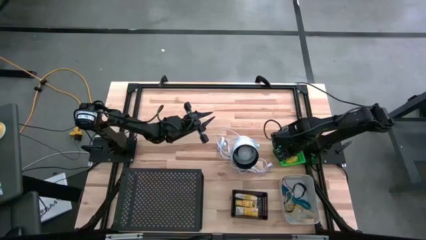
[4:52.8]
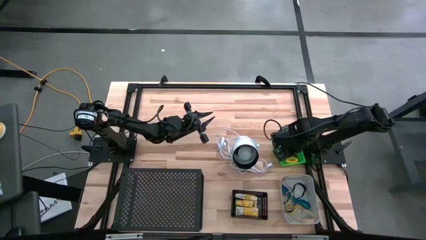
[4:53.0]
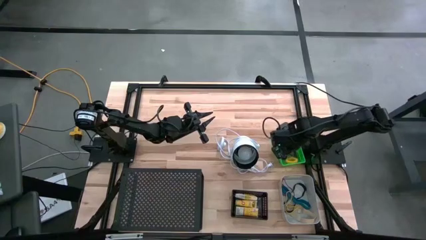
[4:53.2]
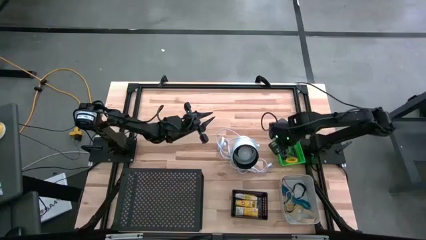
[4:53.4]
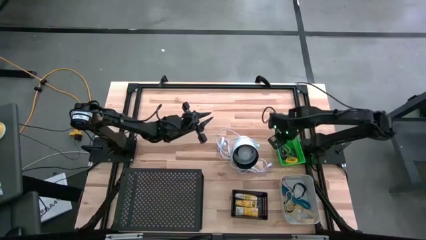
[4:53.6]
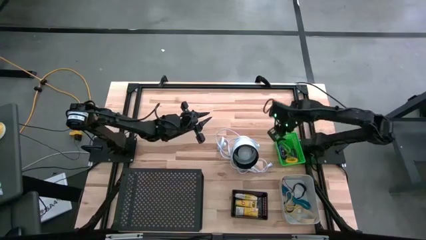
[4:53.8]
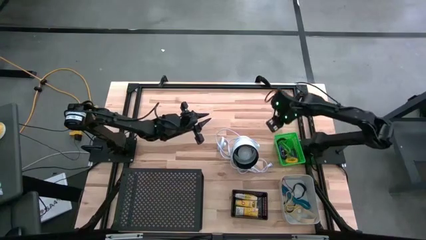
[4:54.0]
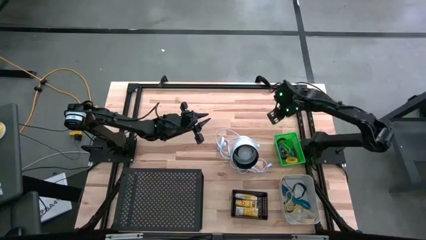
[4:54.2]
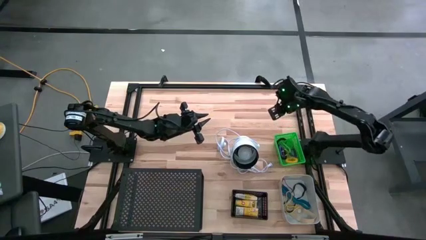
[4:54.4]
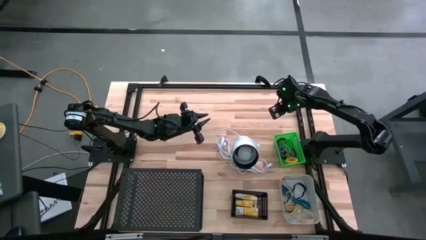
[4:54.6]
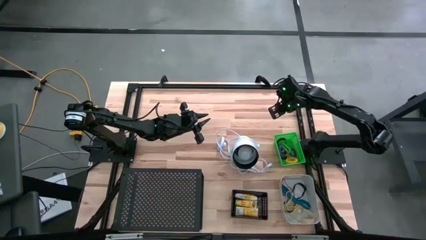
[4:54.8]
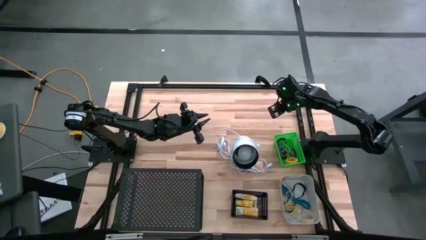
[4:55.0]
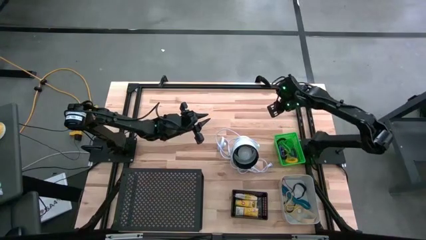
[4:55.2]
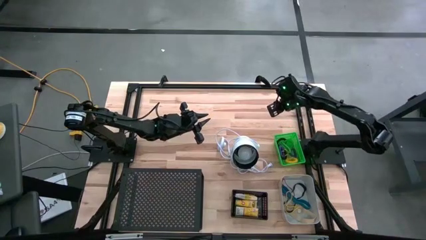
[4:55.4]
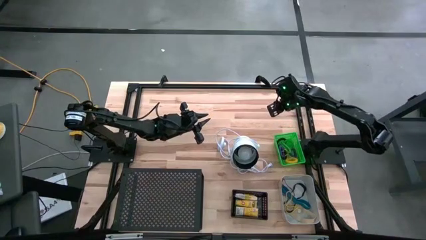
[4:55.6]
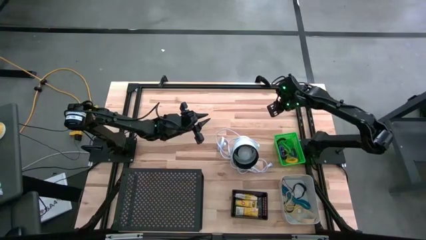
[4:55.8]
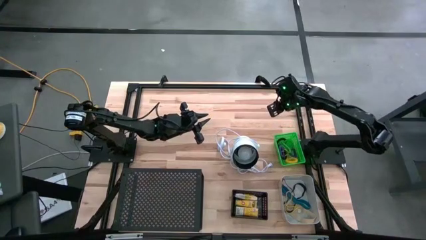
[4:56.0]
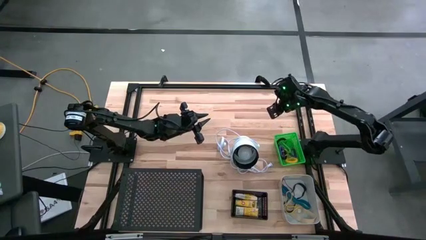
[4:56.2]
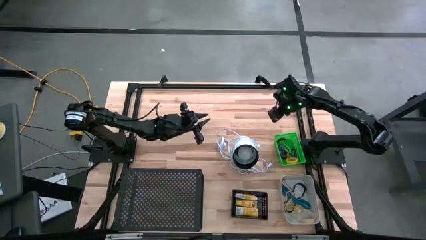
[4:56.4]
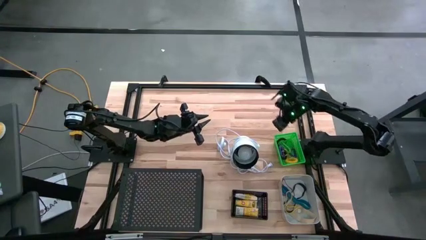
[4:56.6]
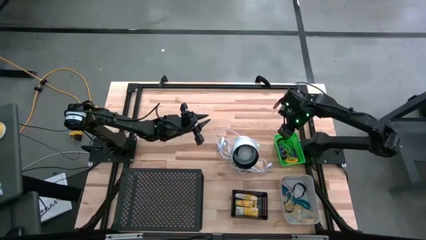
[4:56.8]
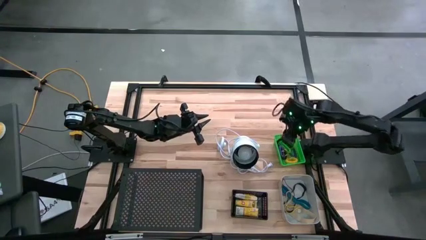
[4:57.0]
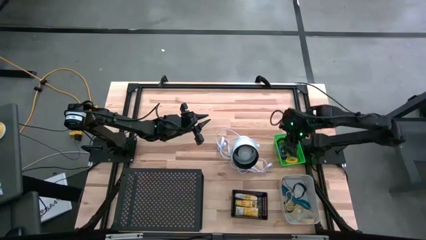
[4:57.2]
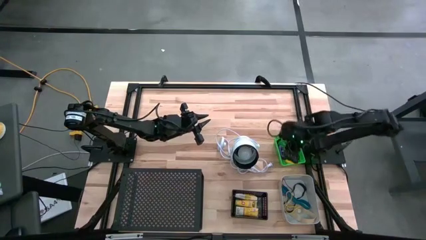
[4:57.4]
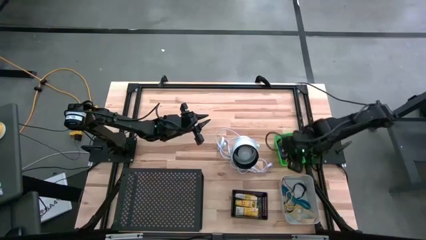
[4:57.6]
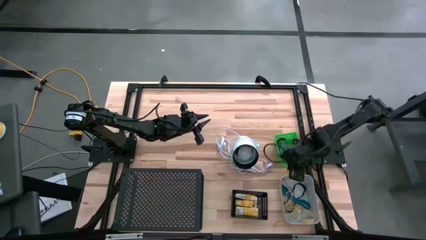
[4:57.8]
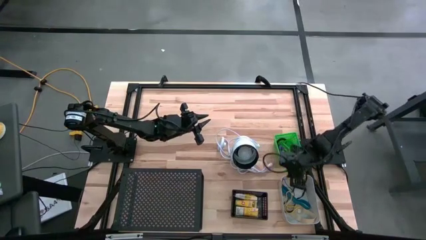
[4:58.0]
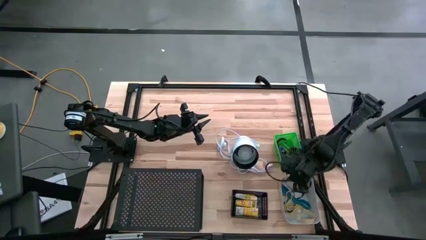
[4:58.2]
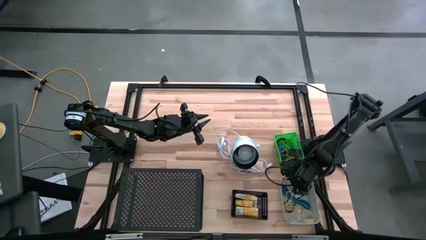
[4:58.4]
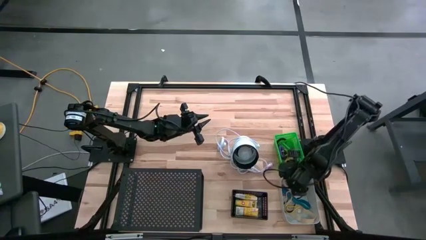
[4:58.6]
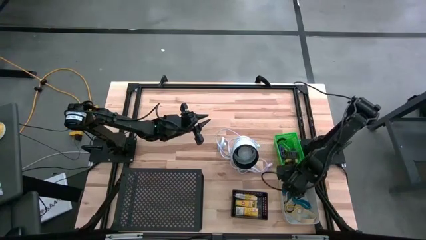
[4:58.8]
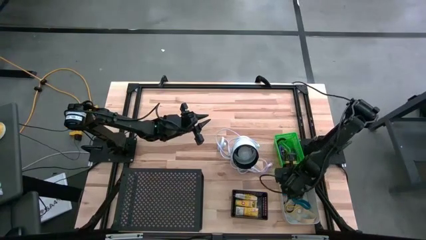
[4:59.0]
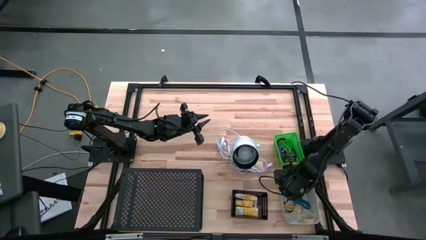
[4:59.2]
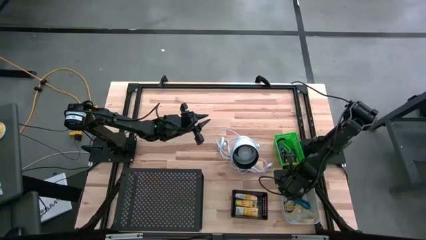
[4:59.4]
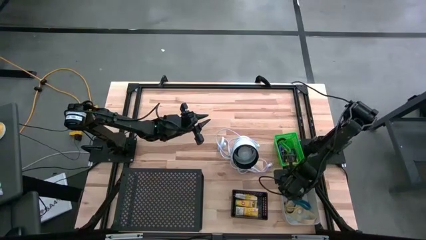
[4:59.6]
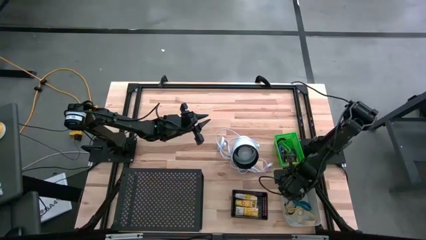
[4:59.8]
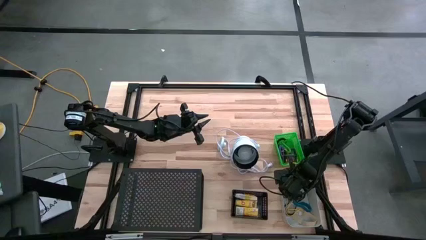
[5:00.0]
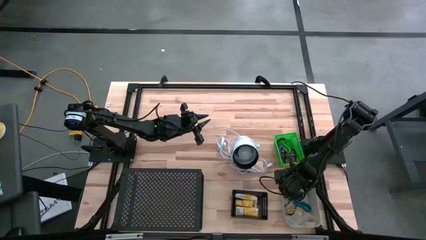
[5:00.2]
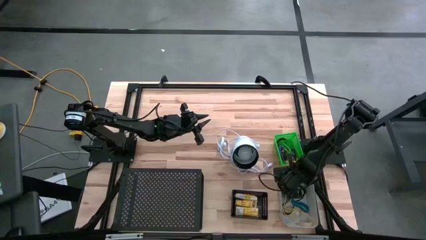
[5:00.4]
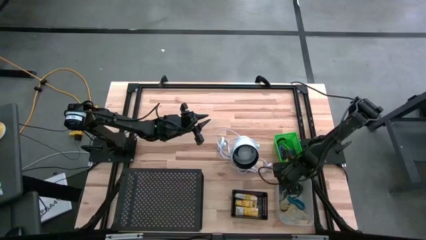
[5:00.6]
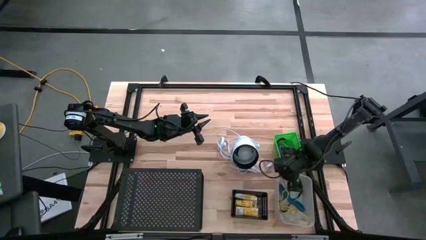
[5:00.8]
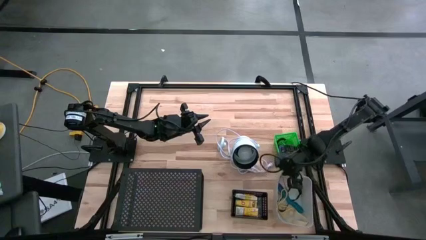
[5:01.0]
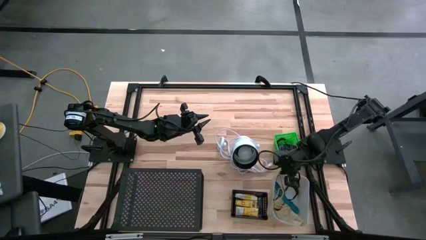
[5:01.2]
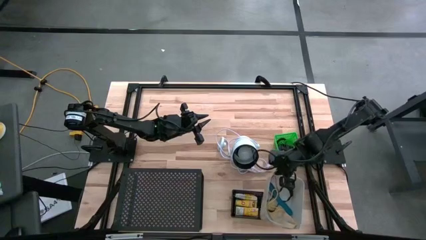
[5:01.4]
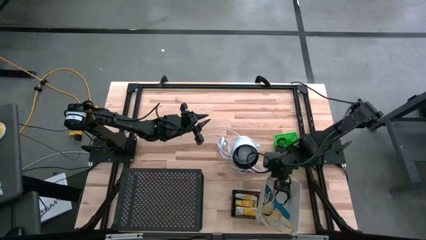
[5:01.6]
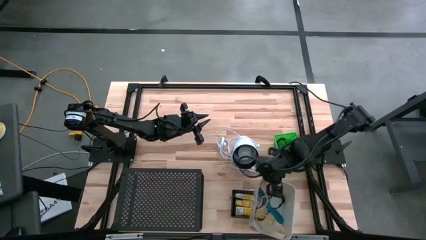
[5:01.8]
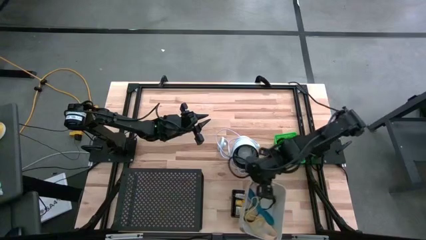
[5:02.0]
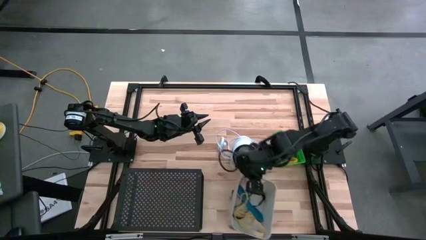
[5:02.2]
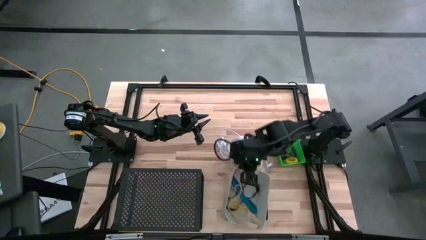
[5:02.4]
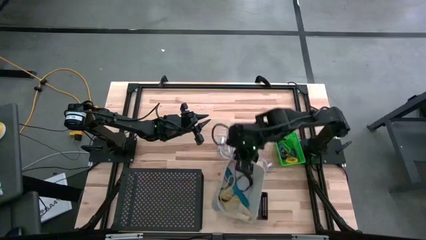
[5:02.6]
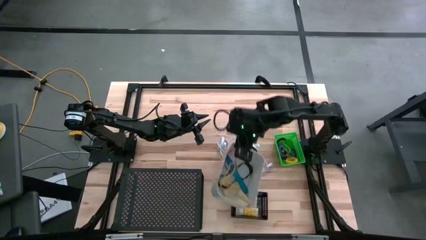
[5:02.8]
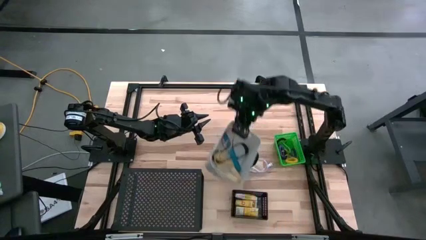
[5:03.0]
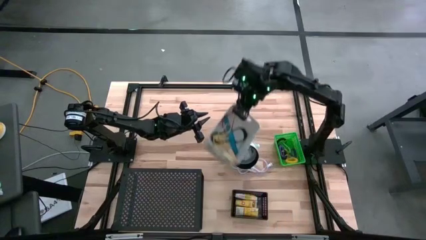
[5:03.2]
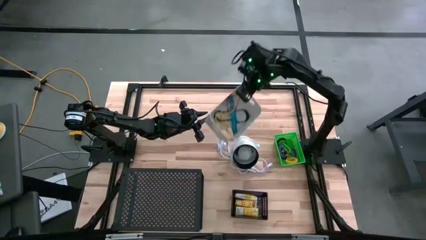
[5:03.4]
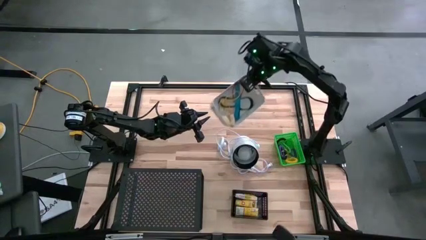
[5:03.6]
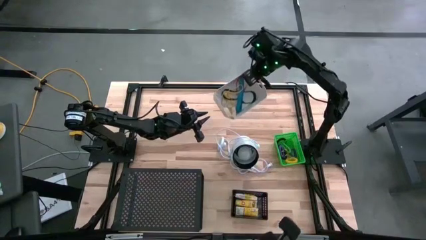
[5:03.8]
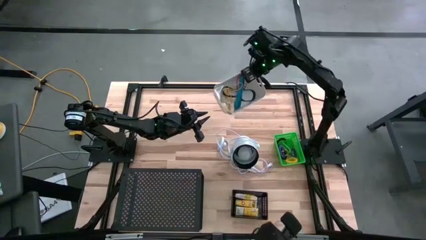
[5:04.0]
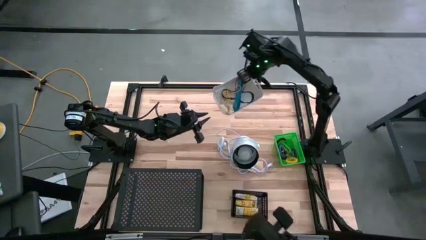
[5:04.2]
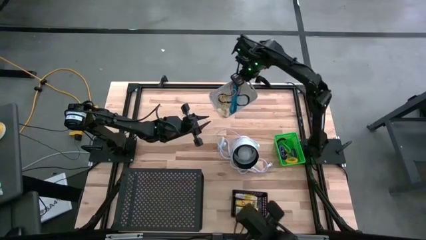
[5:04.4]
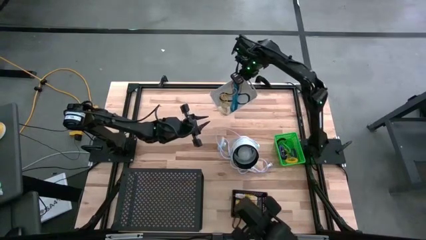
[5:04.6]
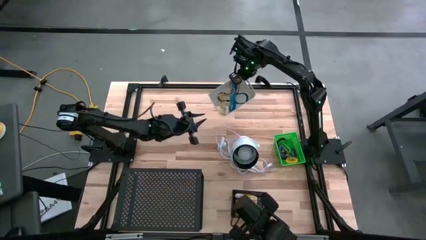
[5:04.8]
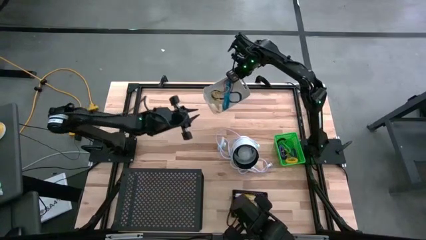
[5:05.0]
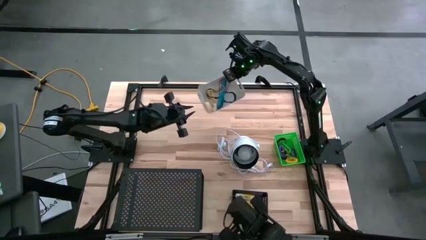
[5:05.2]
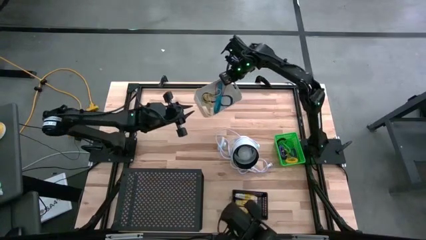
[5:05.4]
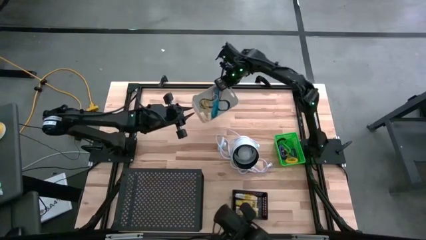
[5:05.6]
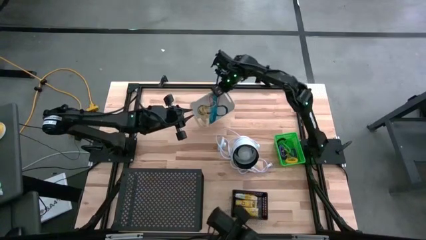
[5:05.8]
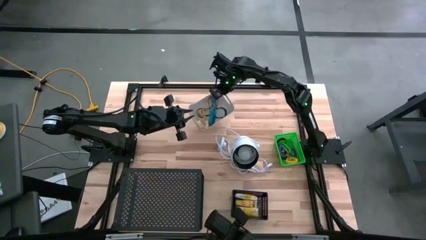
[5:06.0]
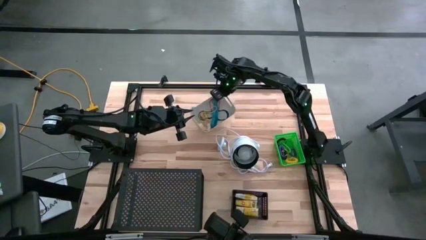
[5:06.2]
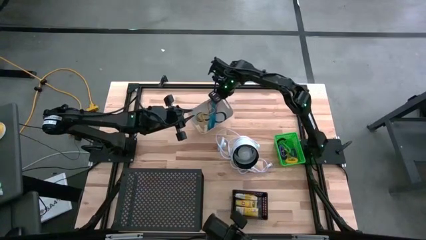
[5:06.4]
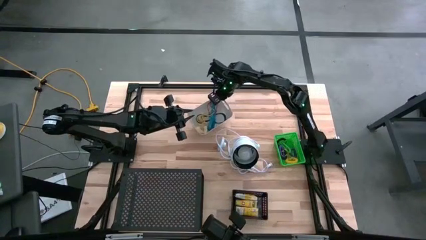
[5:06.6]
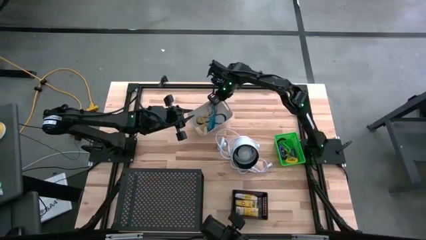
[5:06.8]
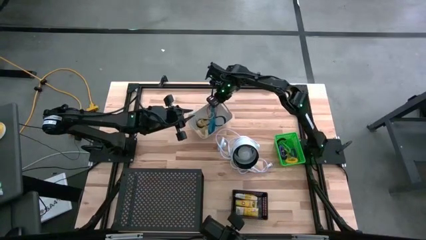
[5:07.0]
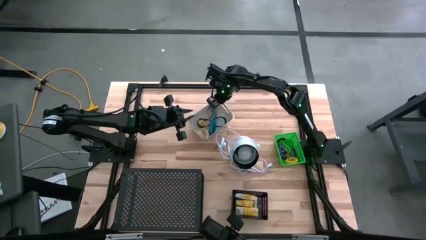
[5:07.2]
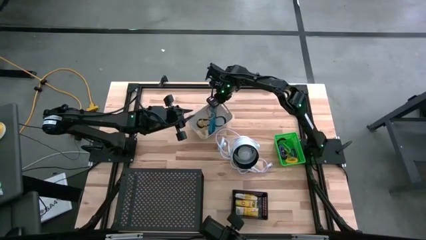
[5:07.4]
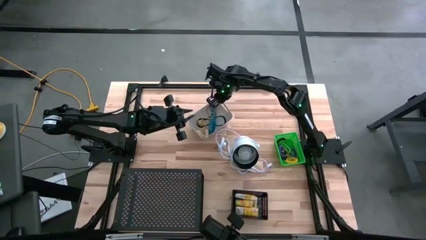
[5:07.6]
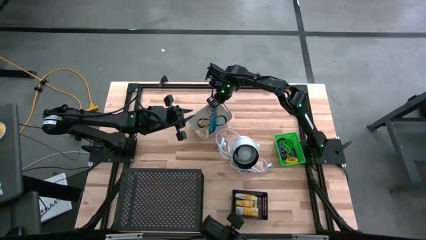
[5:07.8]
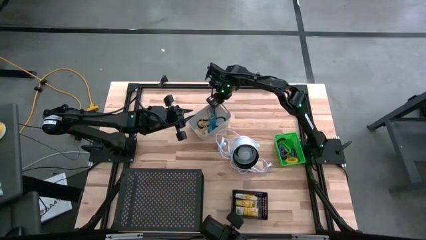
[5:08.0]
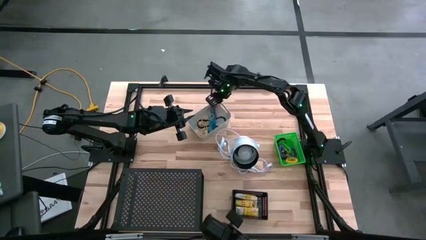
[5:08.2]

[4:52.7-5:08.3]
Task: Pick & Place Office Desk Supplies
Put the gray bin on the shelf

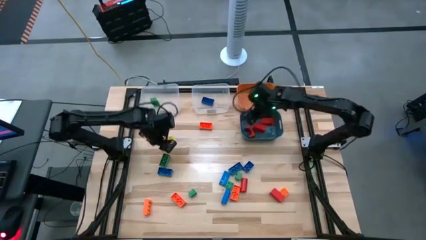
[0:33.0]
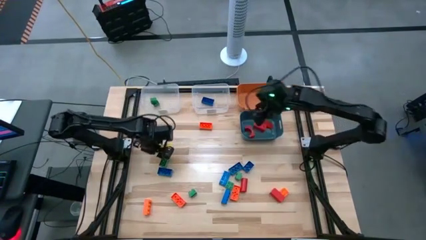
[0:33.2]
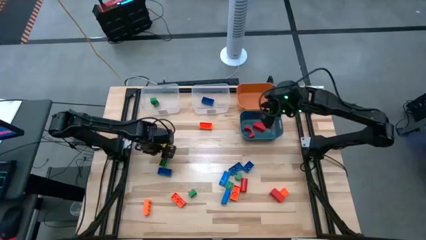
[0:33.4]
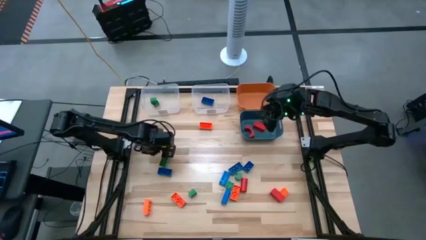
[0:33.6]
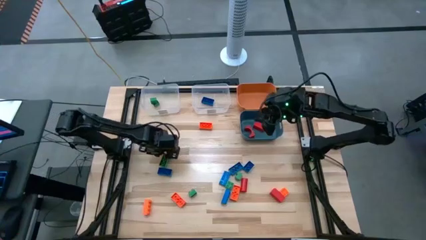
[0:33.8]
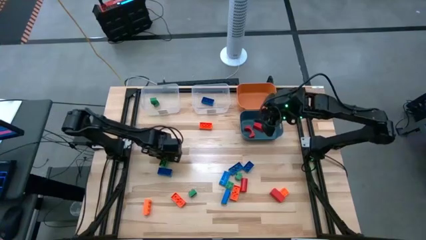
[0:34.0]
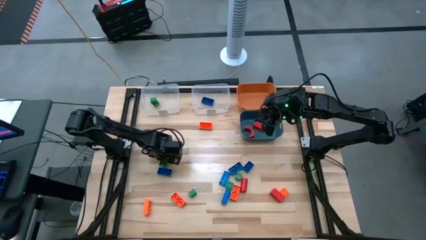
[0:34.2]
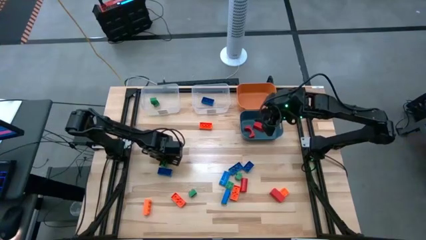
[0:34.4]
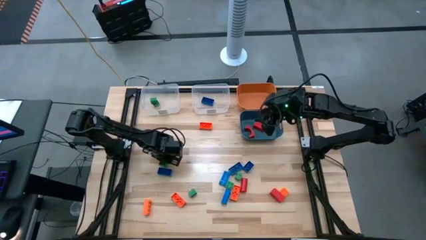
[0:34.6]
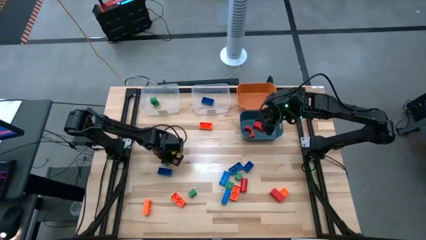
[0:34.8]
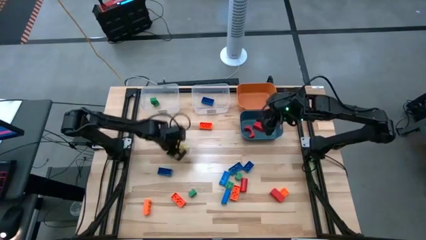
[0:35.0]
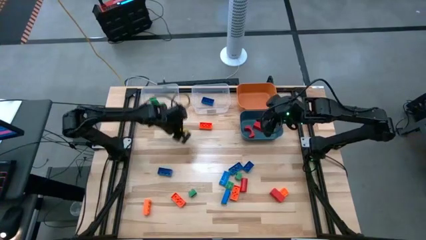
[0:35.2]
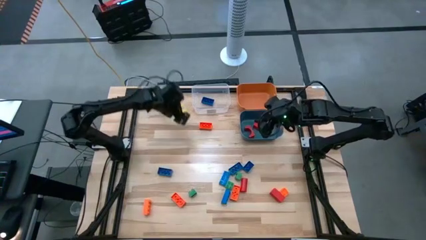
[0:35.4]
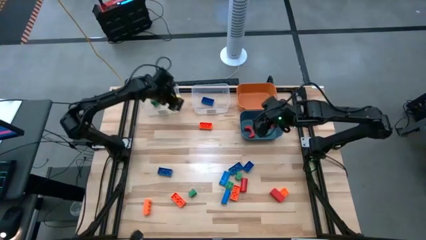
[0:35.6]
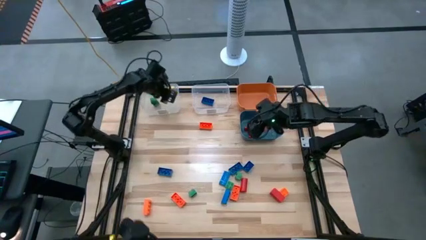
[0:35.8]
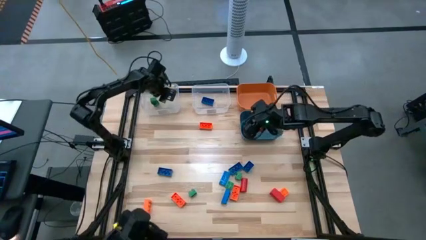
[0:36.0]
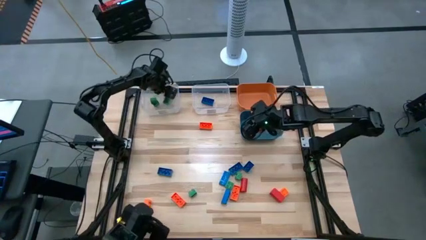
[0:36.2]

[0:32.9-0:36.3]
Task: Sort blocks
Put the green game piece into the left transparent bin
